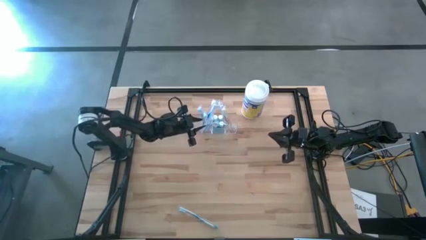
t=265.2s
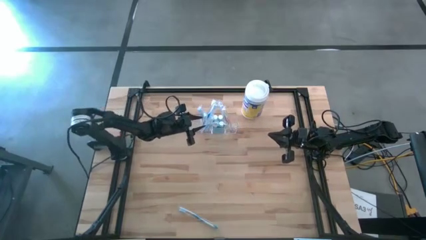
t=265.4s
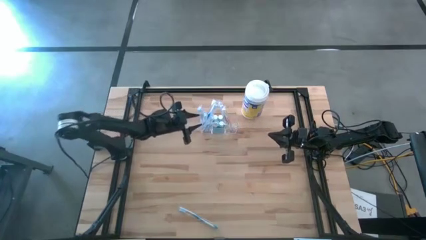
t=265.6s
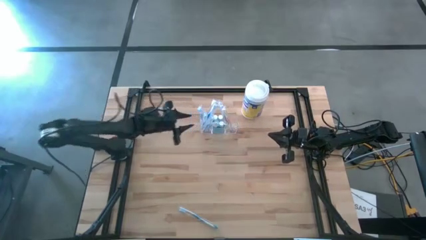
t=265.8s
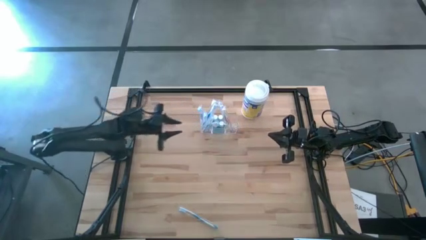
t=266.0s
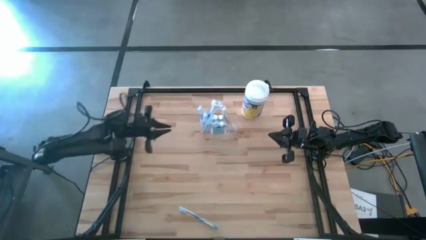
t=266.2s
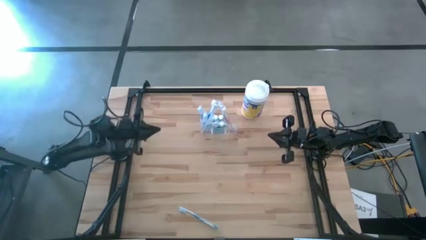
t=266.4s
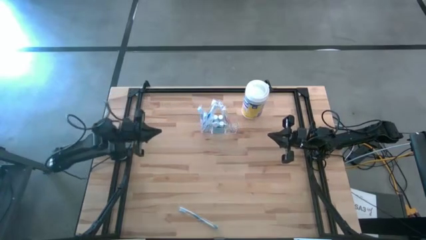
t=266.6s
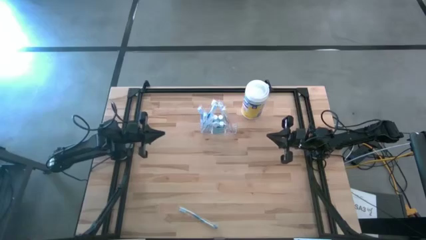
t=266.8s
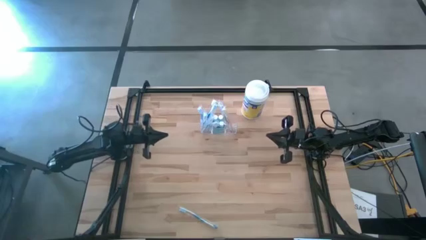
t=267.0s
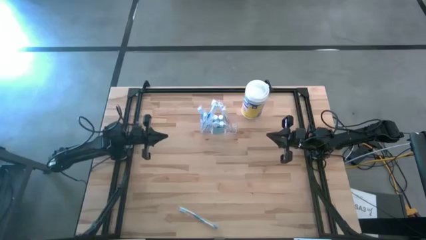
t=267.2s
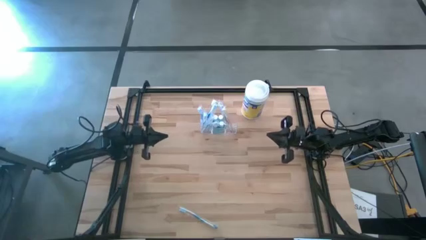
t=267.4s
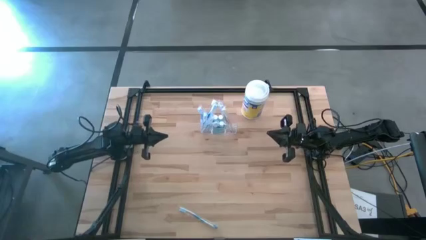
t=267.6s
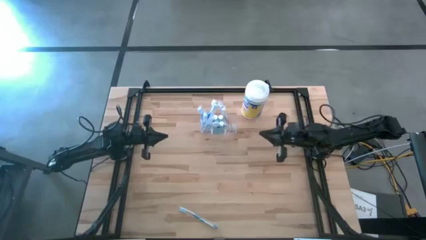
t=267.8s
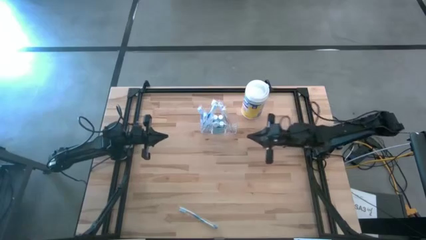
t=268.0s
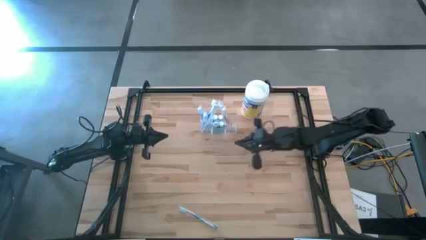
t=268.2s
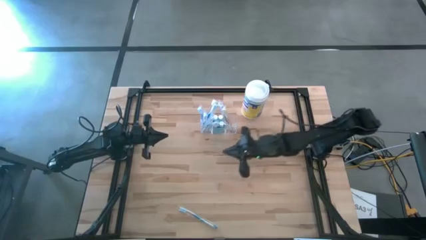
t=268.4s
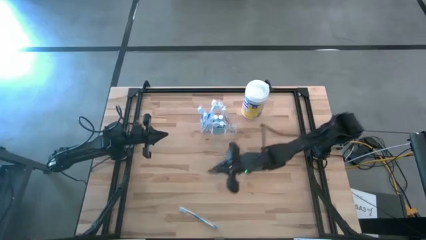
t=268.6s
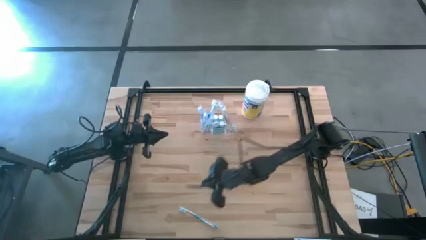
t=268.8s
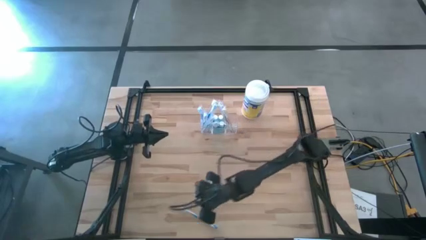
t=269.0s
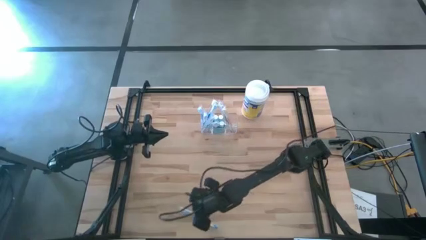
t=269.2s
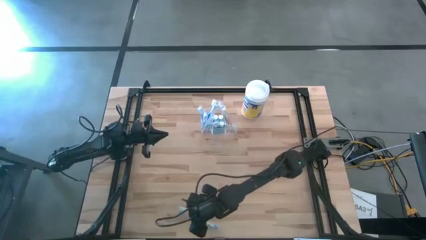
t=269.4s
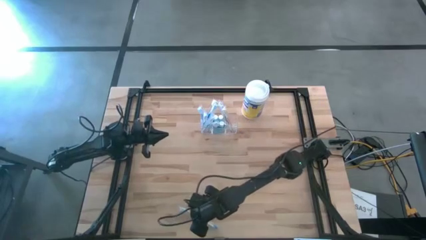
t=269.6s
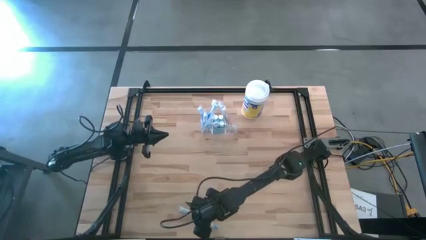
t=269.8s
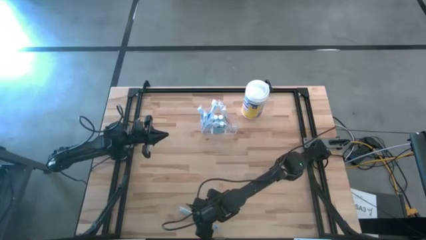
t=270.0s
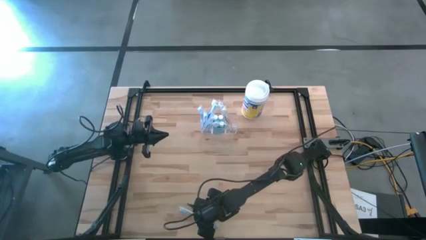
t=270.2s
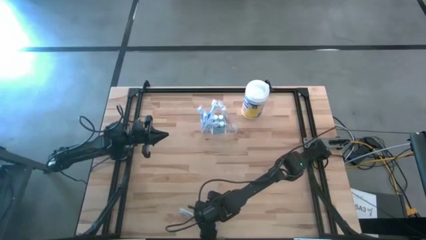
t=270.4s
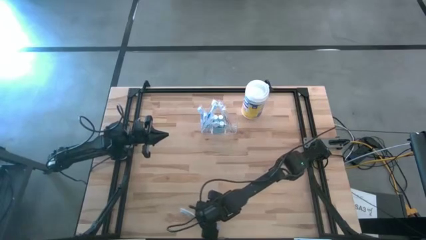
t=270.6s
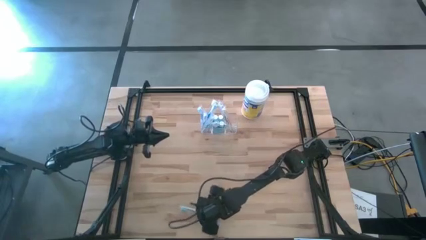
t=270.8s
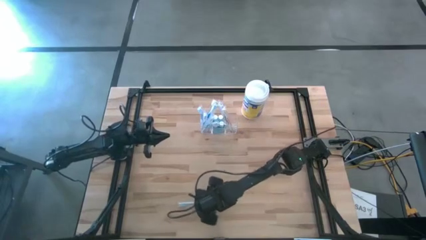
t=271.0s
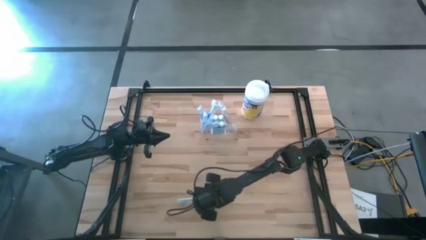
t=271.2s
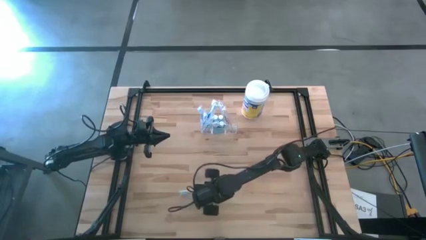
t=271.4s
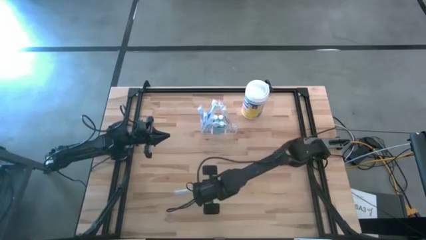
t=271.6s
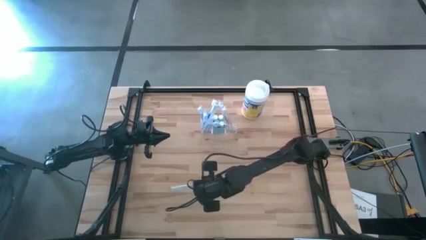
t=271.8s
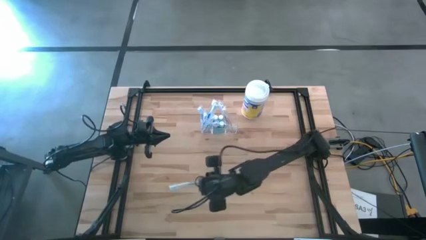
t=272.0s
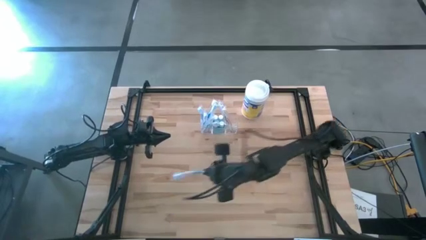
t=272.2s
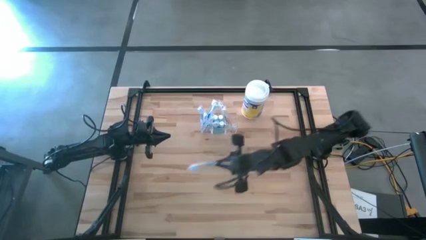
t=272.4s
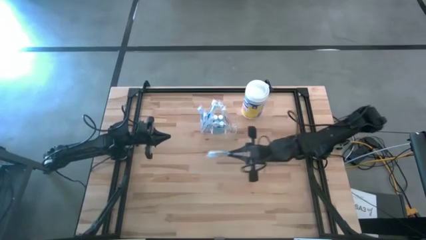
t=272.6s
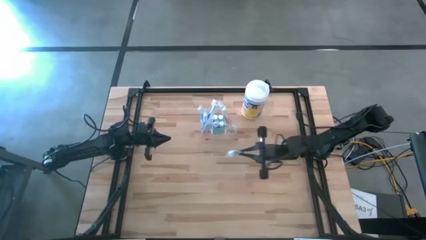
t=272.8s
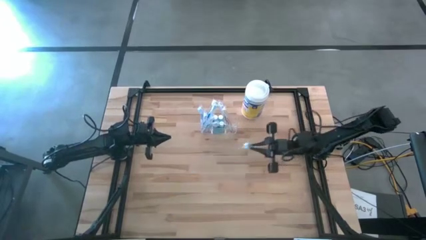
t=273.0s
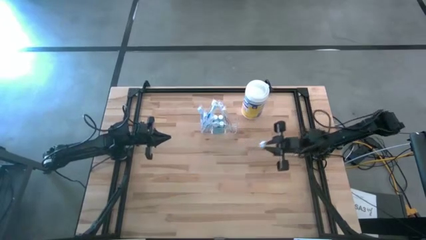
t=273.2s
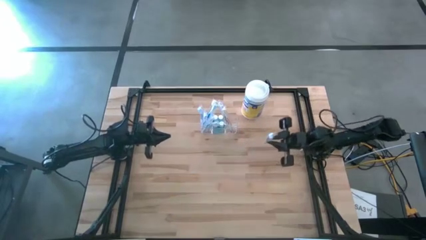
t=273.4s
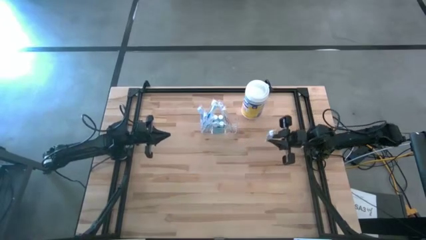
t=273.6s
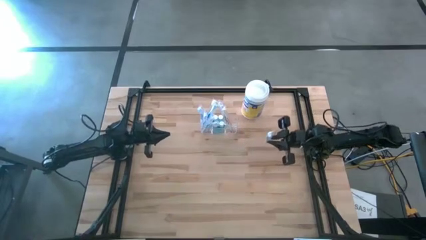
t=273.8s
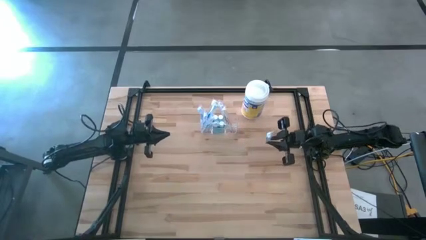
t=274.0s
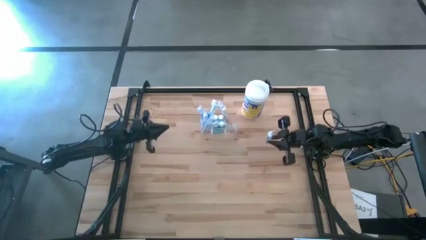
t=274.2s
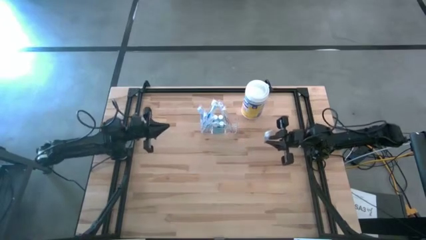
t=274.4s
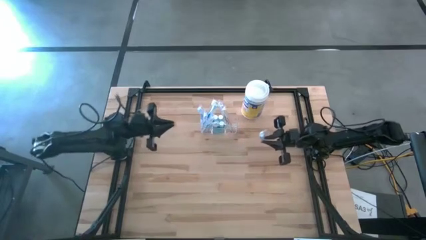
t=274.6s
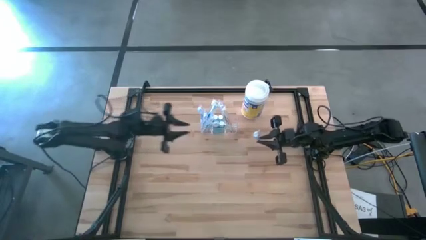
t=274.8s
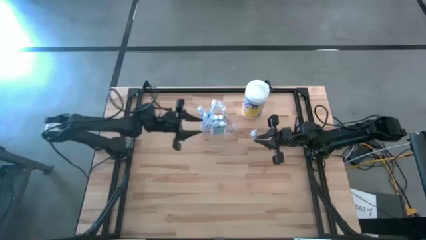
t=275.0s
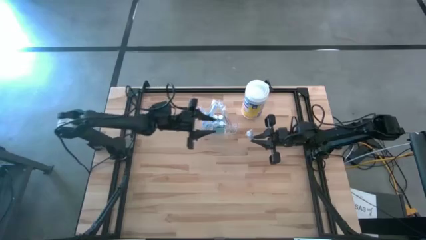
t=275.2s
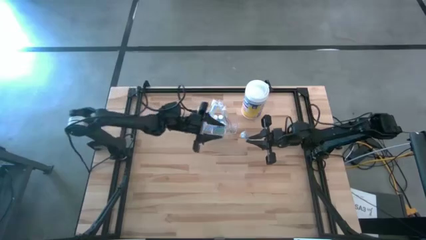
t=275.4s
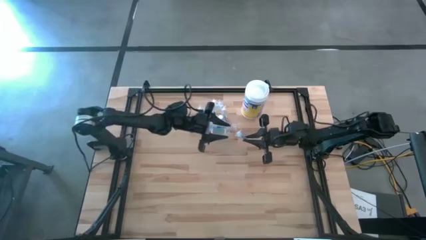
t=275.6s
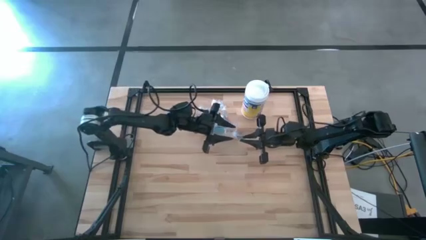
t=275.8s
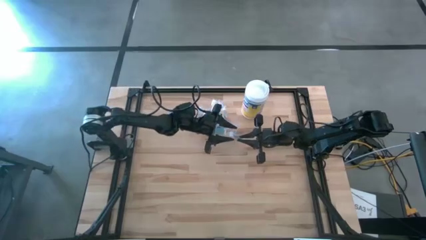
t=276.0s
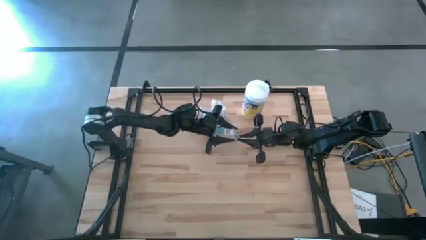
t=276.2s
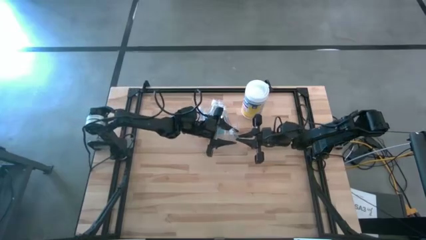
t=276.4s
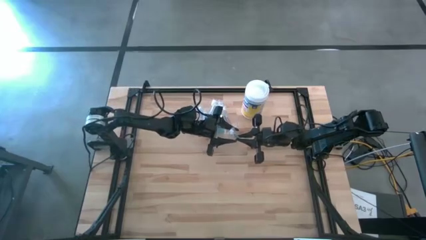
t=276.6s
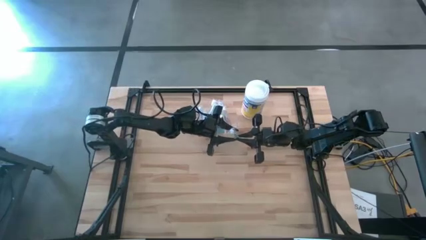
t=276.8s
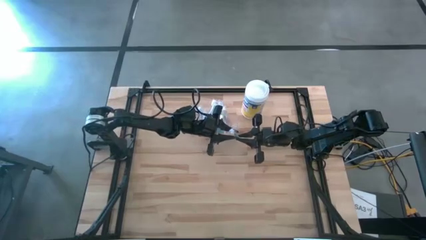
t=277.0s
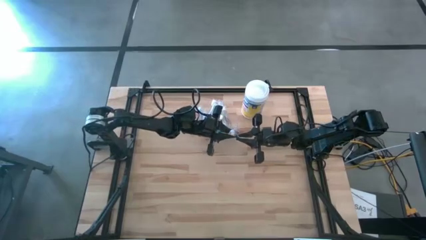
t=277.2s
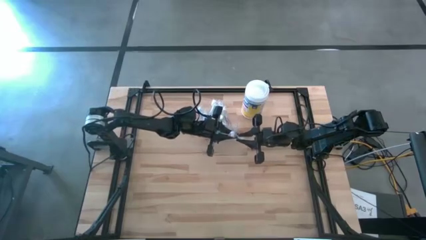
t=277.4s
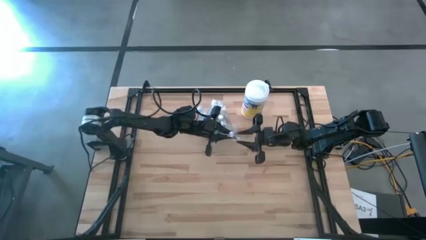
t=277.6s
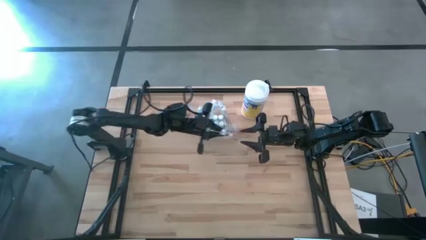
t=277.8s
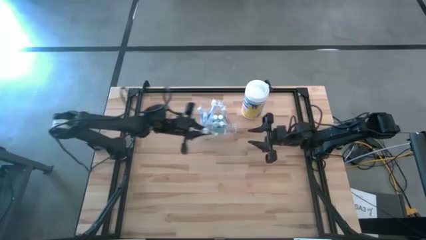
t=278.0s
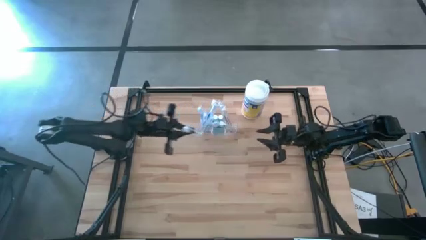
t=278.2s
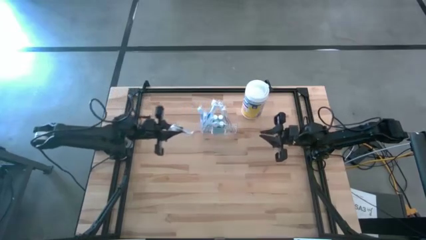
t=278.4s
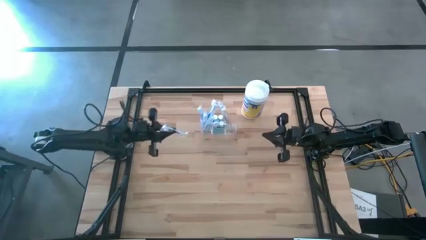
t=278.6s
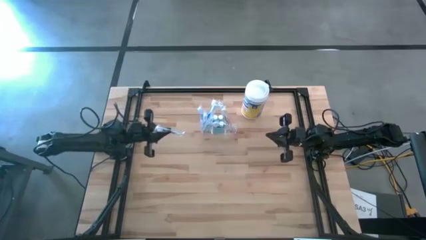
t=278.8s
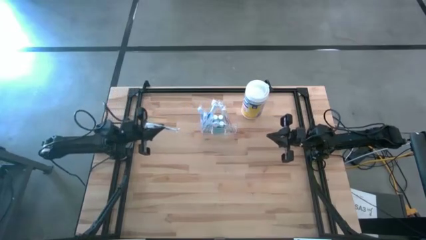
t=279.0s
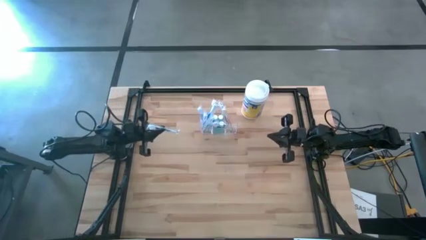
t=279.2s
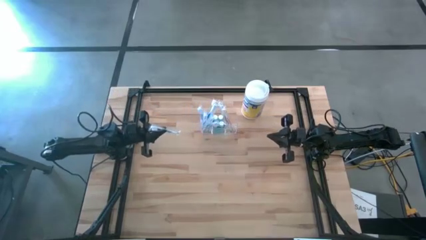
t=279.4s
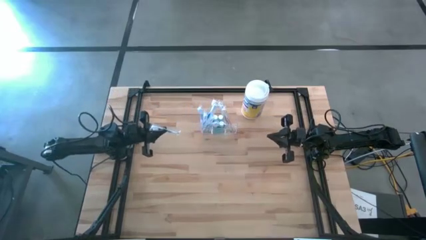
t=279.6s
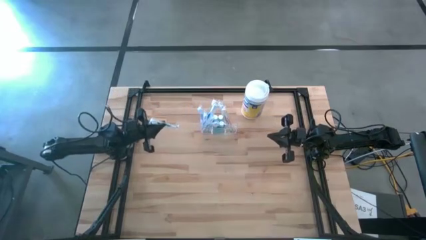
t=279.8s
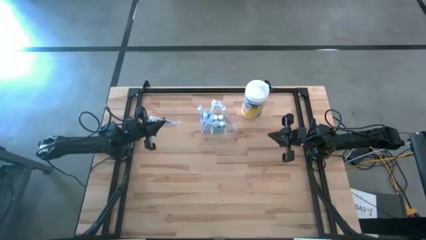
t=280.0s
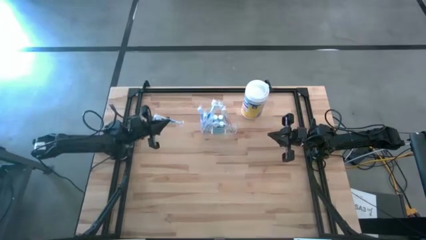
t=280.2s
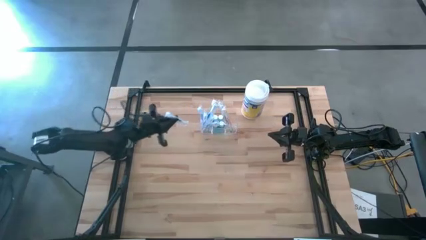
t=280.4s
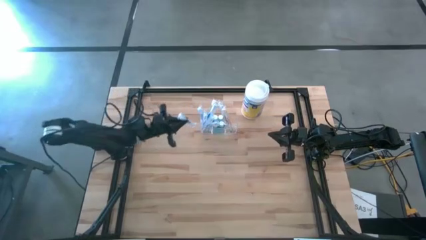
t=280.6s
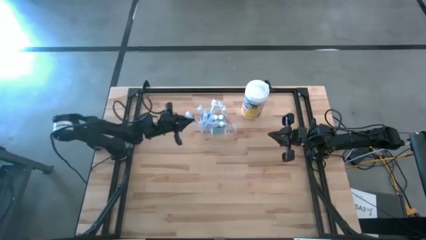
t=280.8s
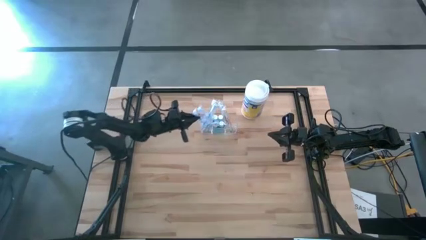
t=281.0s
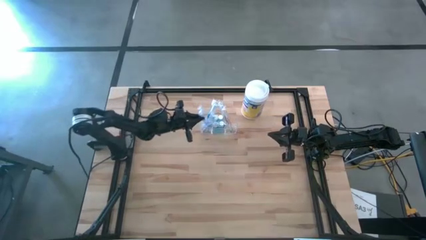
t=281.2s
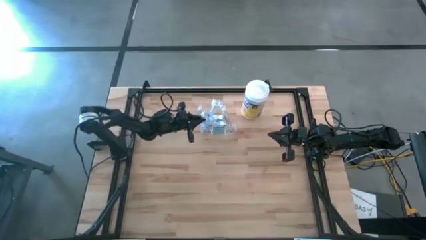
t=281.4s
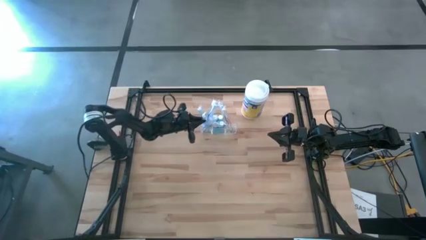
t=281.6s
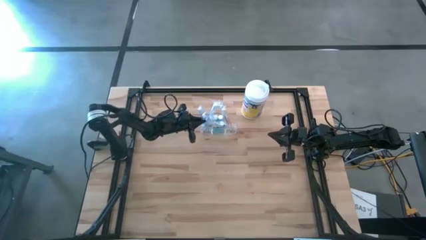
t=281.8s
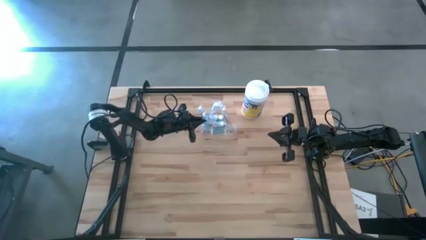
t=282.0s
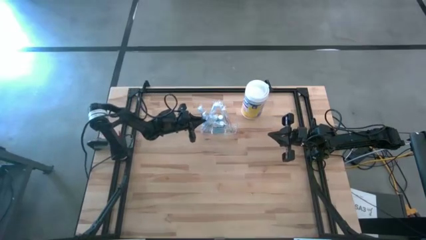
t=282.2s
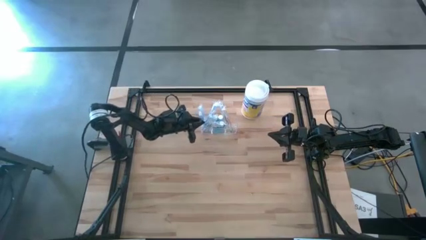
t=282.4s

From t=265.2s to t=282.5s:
Task: Pick & Place toothbrushing station
Put the blue toothbrush into the transparent organizer
